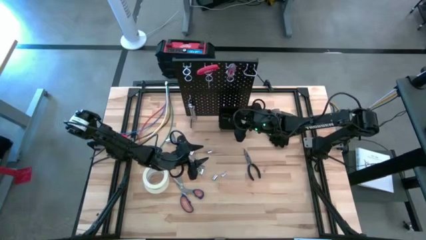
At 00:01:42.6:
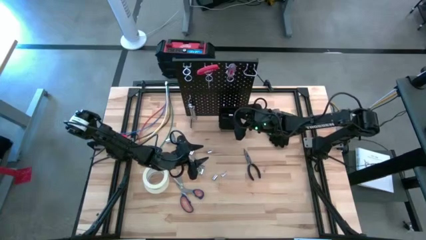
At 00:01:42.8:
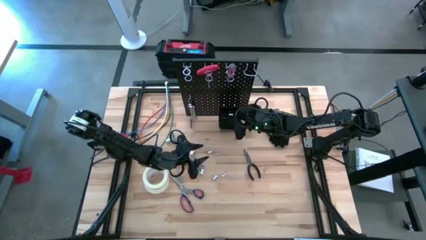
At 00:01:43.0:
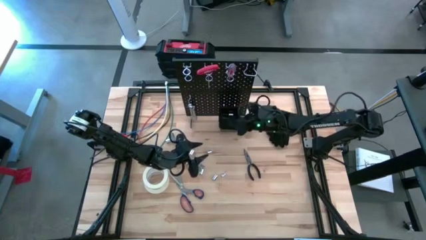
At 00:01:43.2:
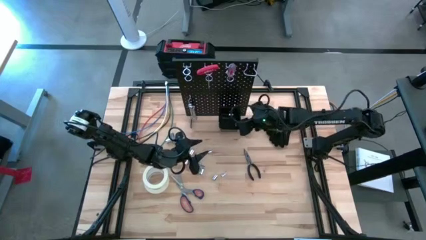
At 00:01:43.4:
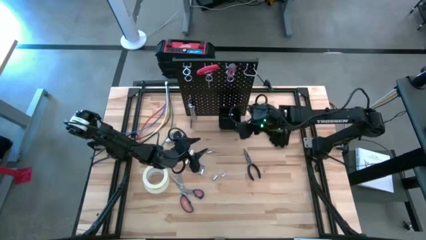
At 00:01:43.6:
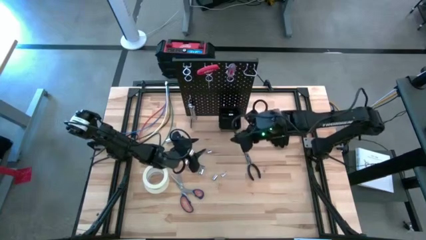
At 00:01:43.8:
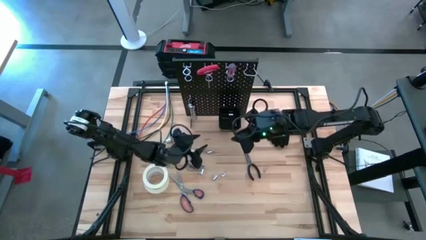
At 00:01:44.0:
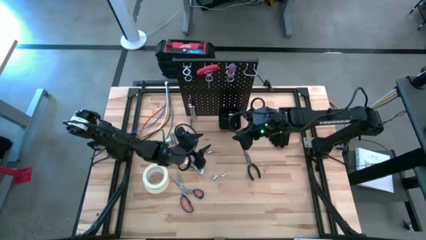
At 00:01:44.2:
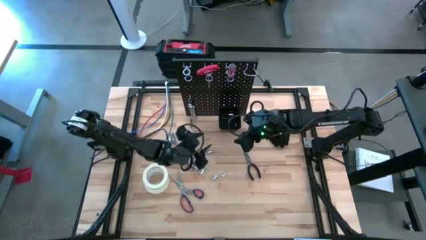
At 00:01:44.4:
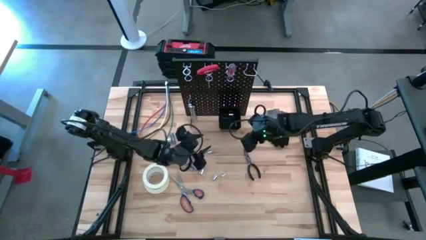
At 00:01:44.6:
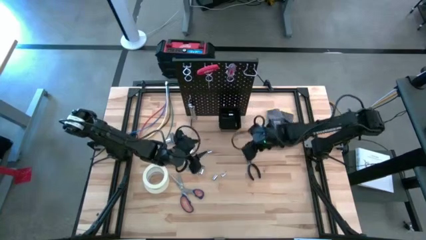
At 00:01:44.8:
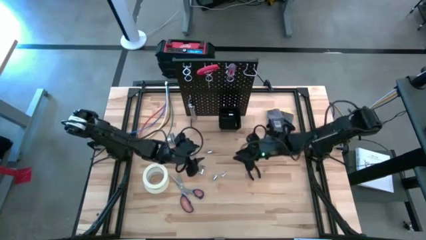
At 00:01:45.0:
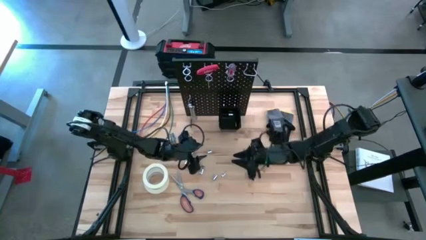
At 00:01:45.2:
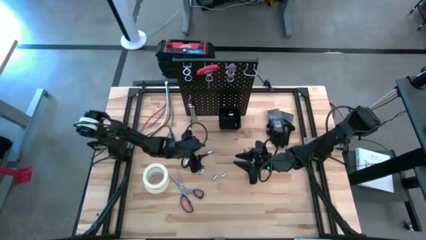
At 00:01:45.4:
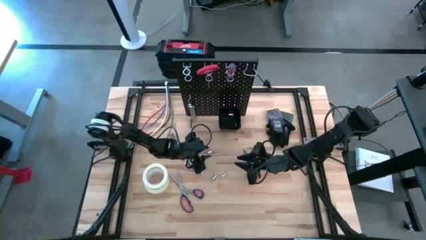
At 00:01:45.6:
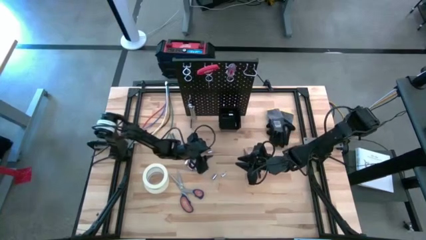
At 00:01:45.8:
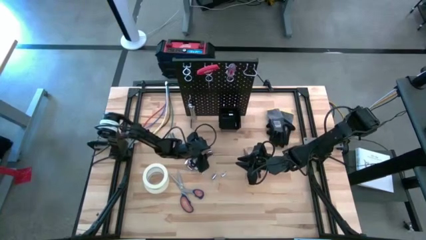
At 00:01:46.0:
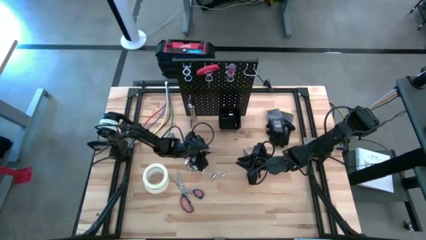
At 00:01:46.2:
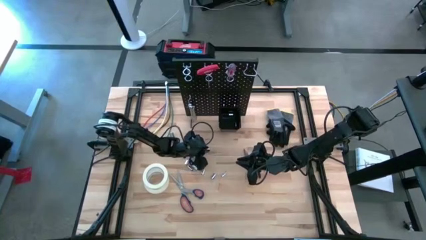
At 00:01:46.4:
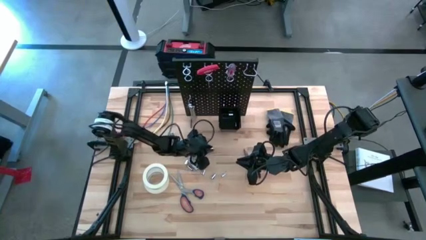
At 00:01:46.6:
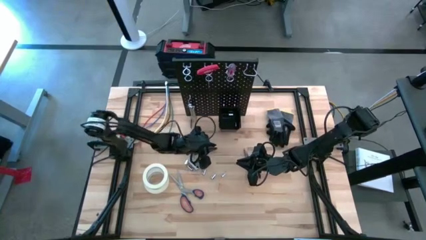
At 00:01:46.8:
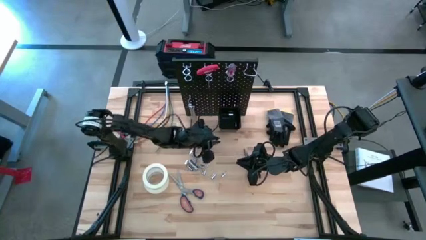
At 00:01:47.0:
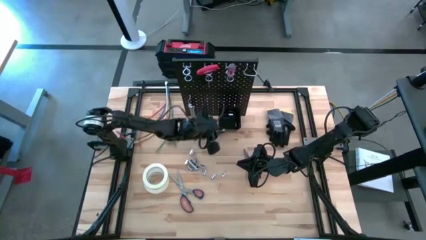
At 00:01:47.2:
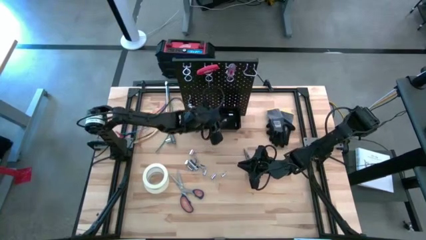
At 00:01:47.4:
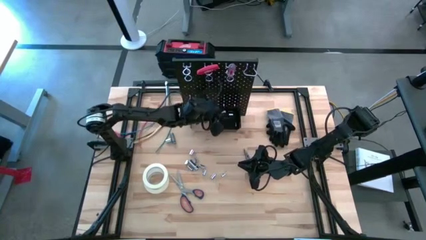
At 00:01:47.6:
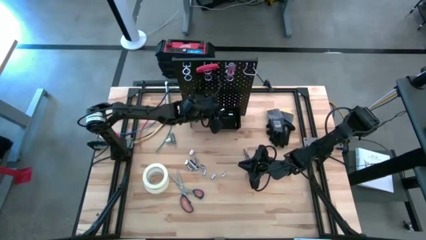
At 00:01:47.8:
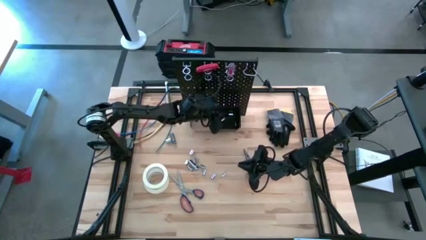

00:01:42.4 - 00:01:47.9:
Task: Hang tools onto peg board
Put the socket into the black bin on the peg board

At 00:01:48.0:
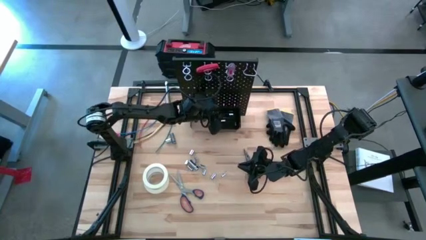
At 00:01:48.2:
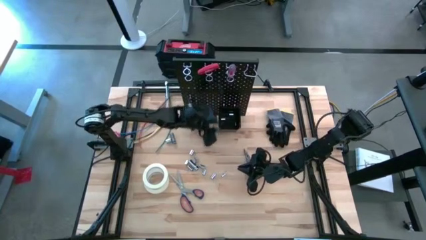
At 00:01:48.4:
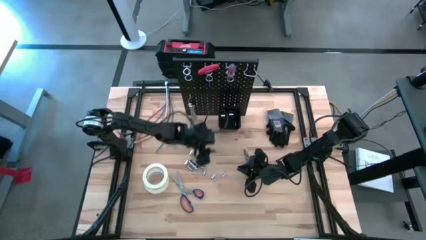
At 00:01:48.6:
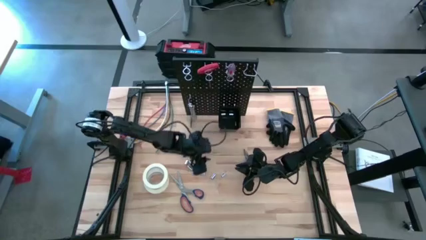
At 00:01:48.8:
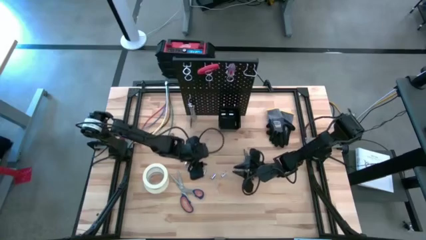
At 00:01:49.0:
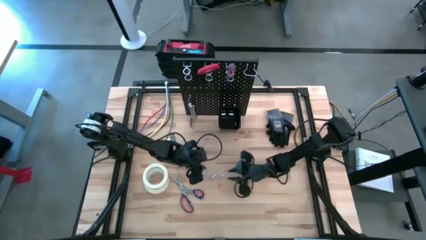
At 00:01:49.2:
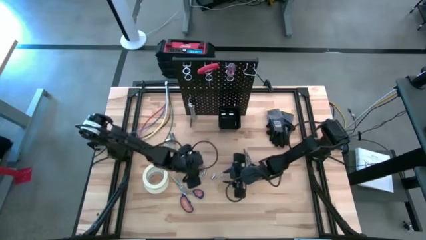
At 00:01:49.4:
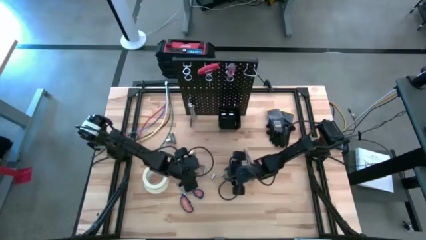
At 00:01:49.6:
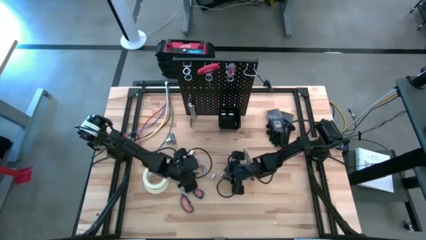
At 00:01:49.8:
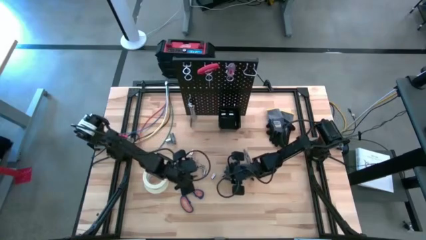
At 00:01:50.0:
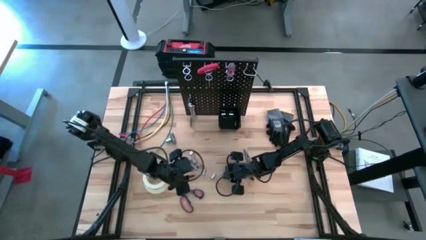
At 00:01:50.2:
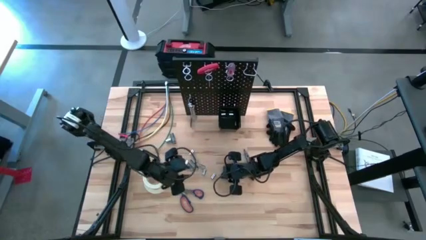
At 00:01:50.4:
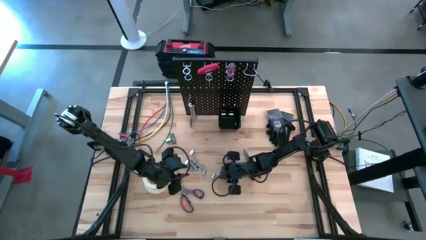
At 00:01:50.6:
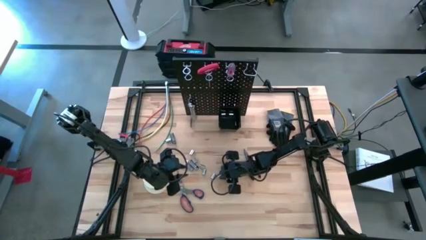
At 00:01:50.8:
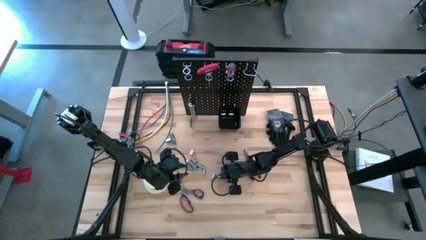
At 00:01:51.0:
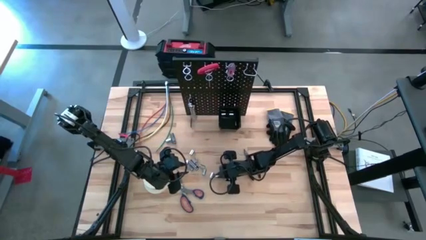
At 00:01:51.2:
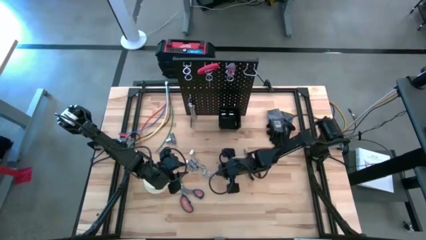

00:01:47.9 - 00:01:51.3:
Put the socket into the black bin on the peg board

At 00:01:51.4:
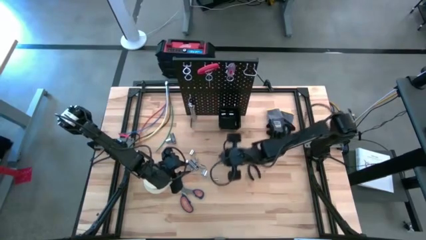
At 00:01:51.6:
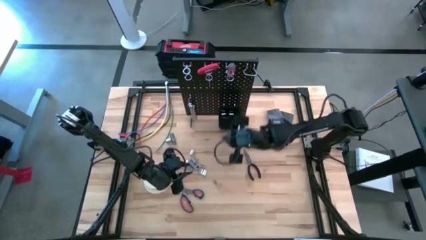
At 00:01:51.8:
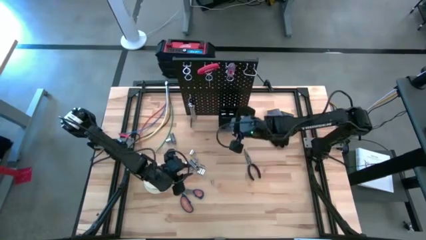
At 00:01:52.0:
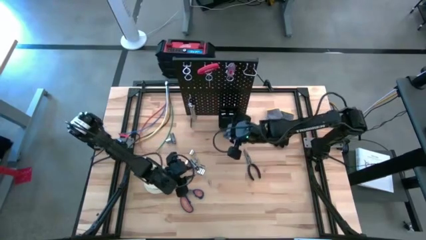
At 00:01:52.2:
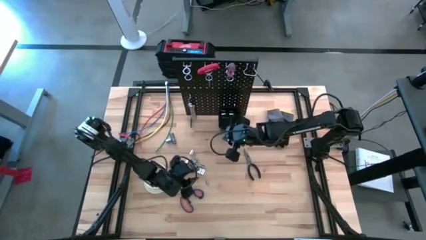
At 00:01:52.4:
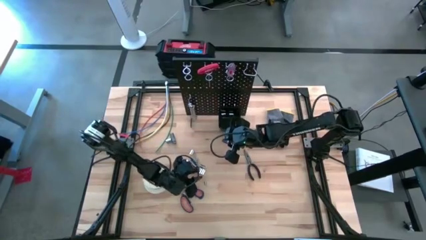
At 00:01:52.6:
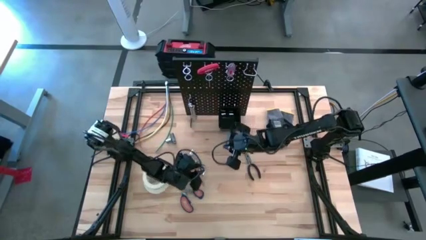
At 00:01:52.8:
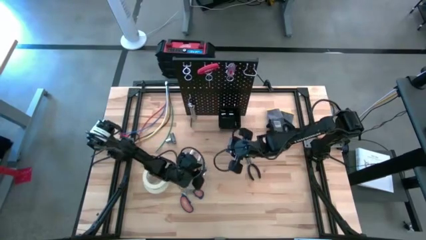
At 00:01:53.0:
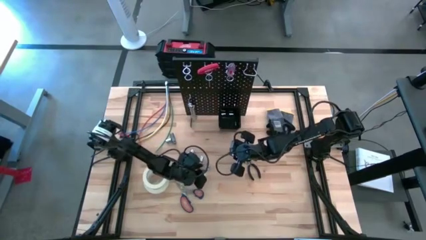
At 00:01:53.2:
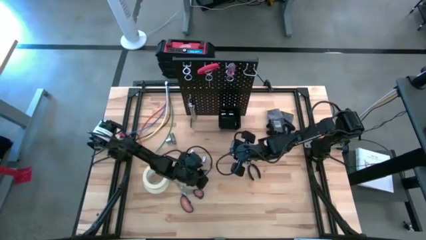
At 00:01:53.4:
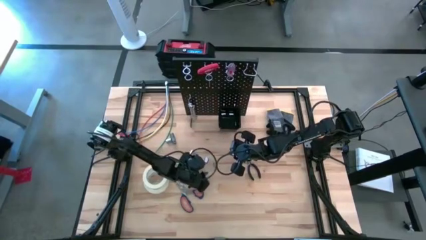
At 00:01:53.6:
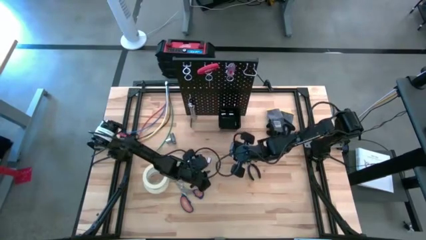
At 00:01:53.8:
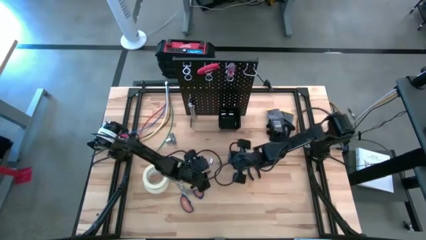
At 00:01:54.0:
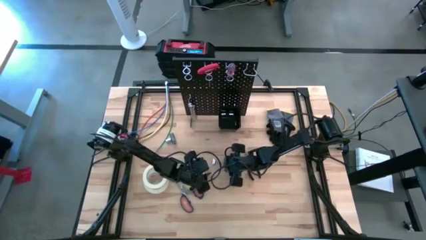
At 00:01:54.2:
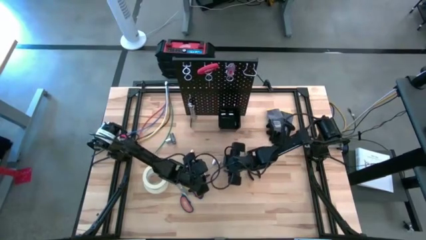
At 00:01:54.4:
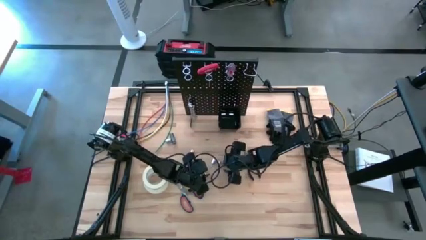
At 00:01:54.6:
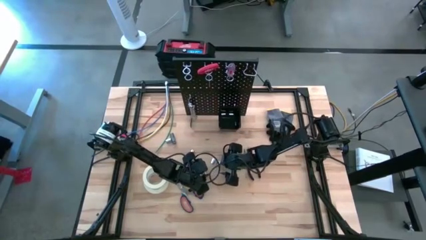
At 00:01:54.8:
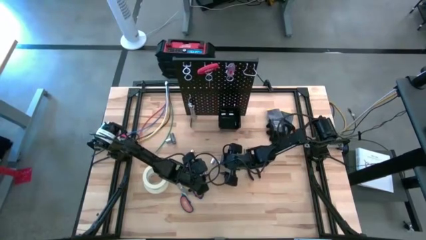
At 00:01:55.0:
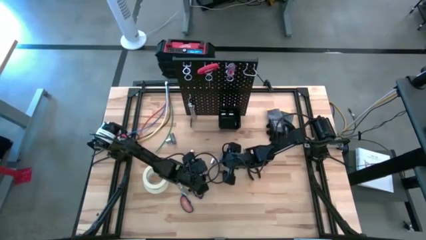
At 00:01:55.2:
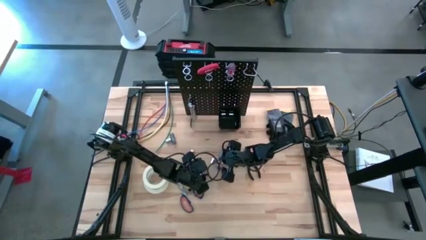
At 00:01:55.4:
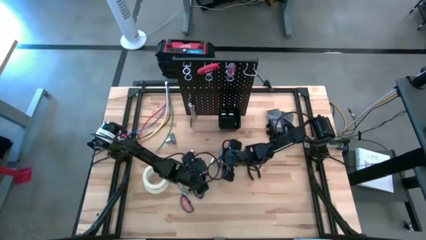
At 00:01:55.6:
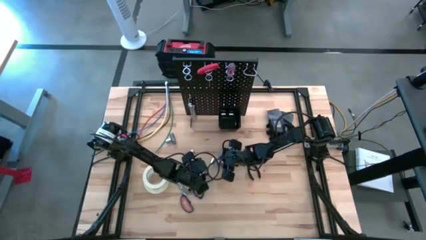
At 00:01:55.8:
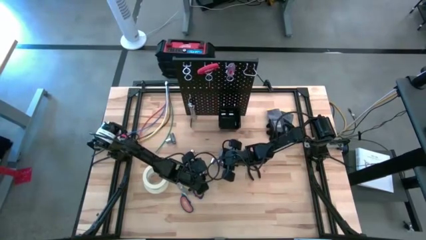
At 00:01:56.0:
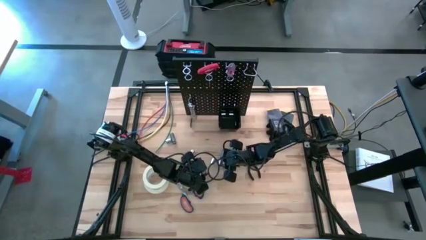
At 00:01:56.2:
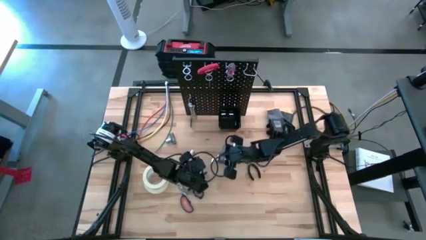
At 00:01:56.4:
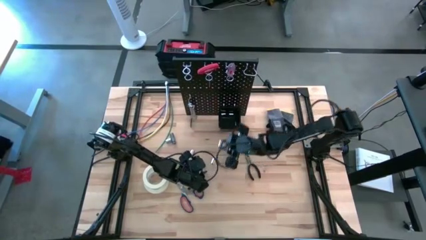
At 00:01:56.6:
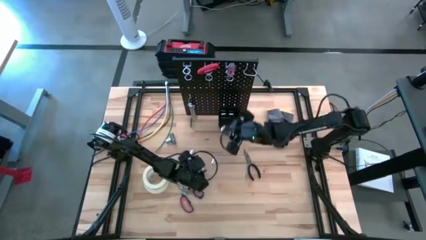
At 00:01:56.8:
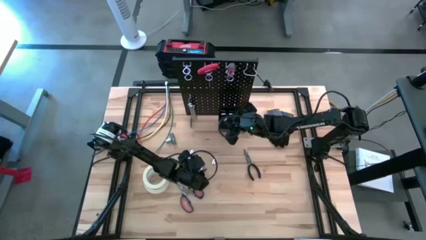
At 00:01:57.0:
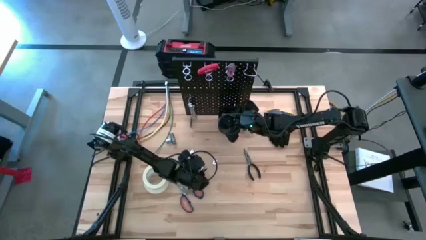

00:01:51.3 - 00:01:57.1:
Put the socket into the black bin on the peg board

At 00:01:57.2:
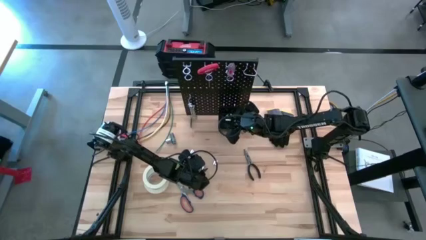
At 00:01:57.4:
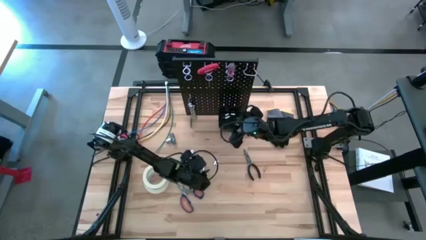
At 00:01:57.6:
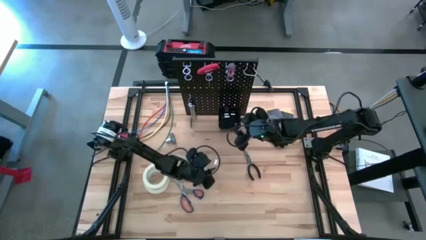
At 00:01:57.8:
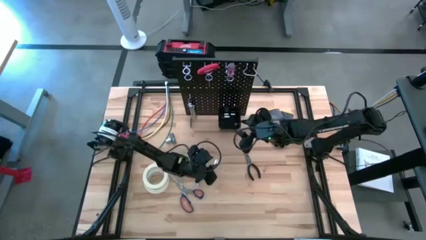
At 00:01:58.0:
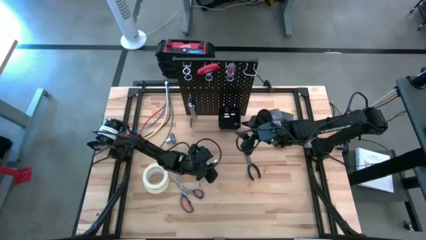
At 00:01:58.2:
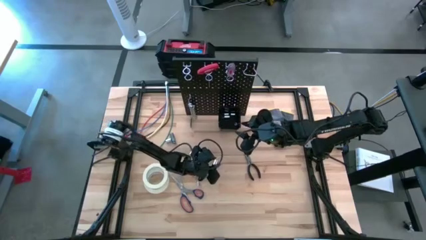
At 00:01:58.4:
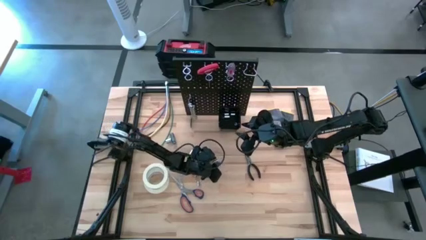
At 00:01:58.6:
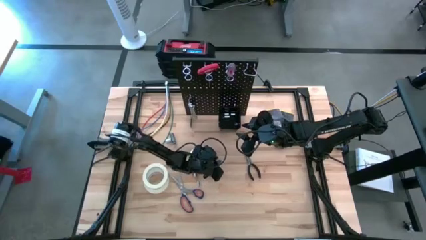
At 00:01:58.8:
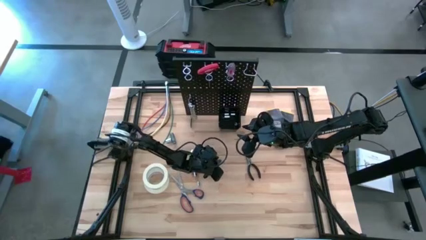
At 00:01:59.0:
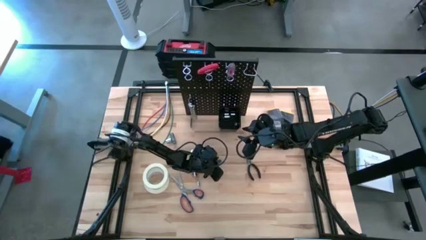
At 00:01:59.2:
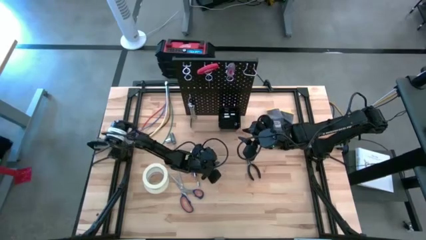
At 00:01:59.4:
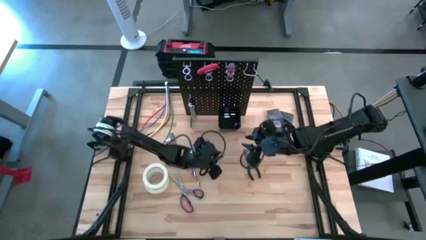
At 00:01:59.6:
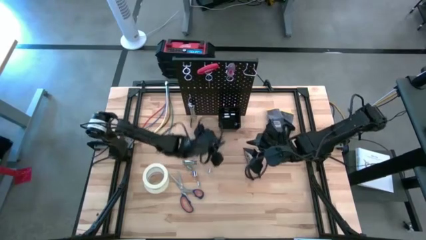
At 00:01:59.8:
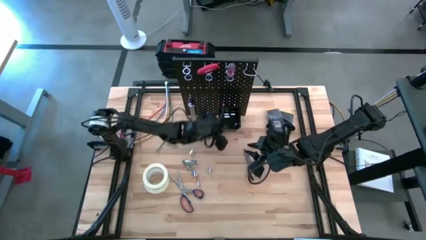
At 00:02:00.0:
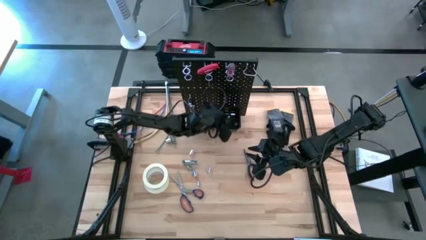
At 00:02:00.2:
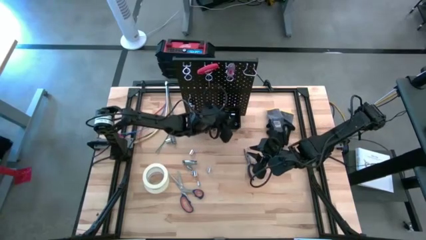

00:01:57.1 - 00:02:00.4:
Put the socket into the black bin on the peg board
